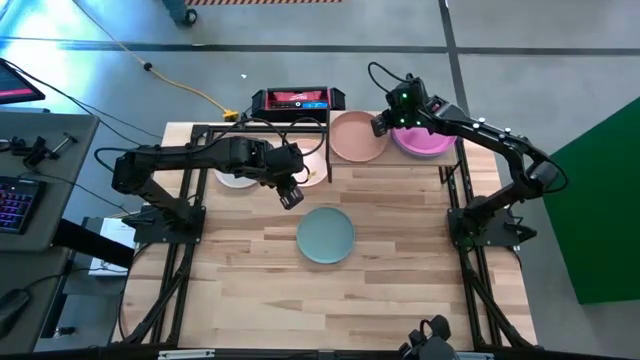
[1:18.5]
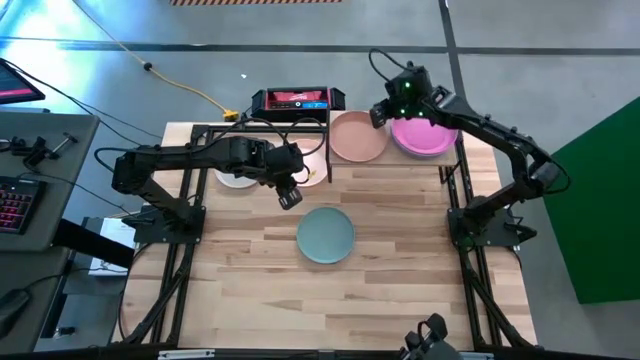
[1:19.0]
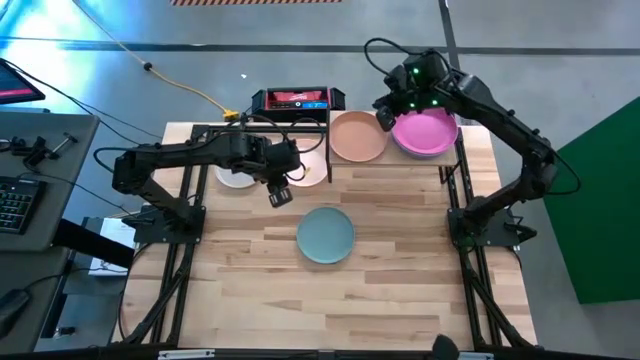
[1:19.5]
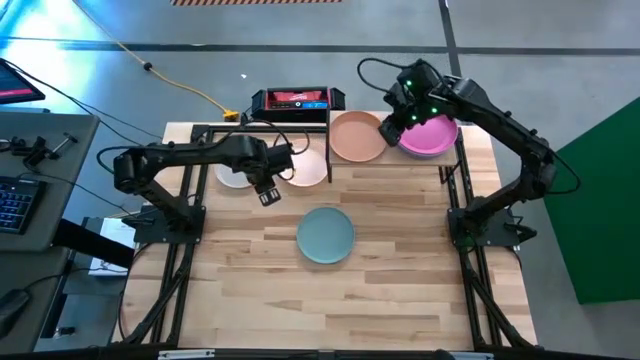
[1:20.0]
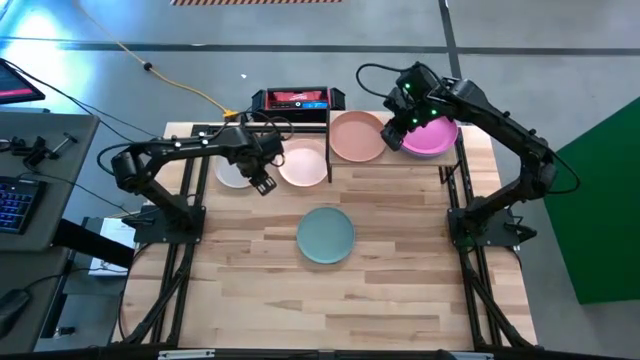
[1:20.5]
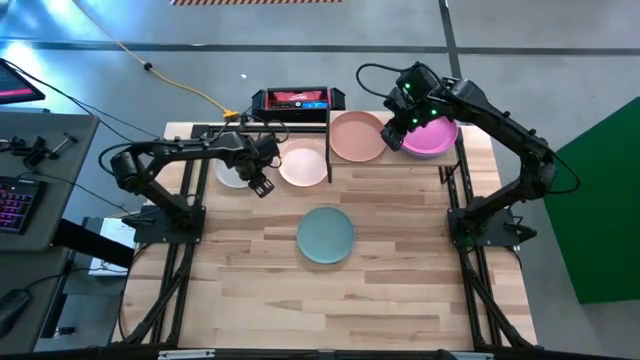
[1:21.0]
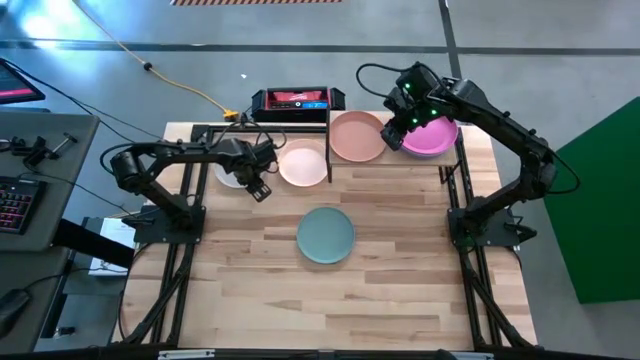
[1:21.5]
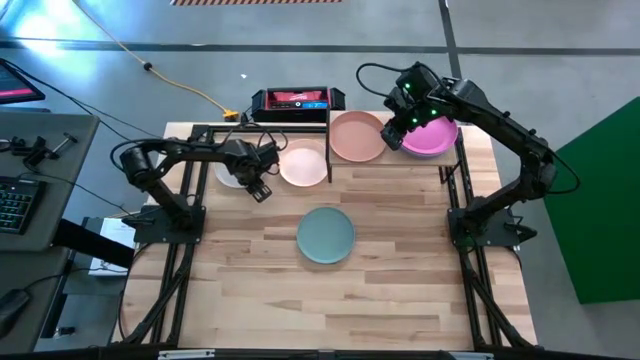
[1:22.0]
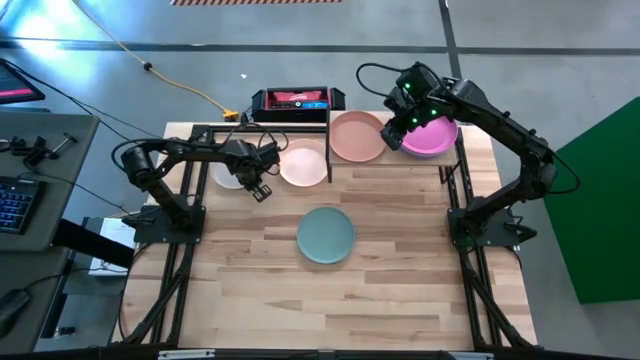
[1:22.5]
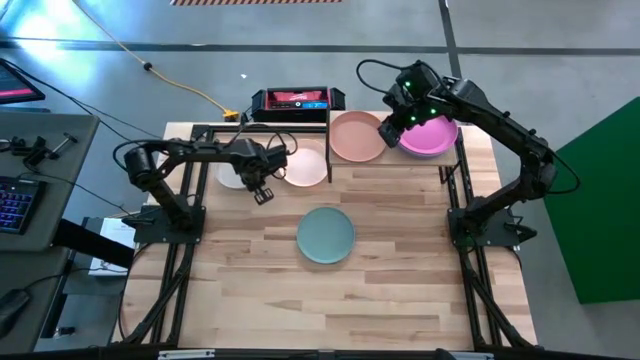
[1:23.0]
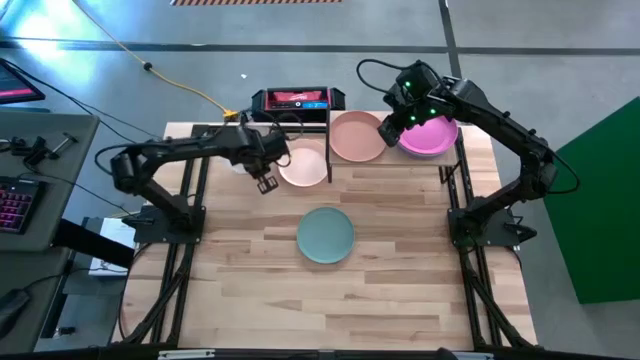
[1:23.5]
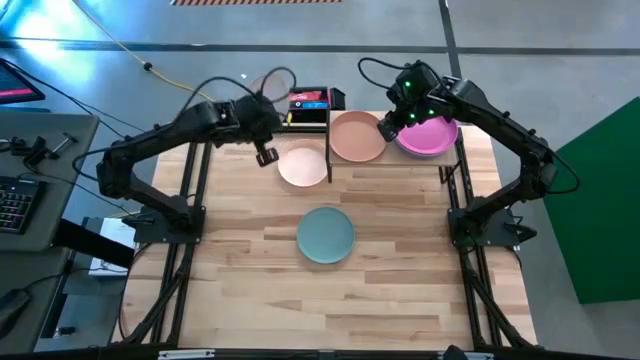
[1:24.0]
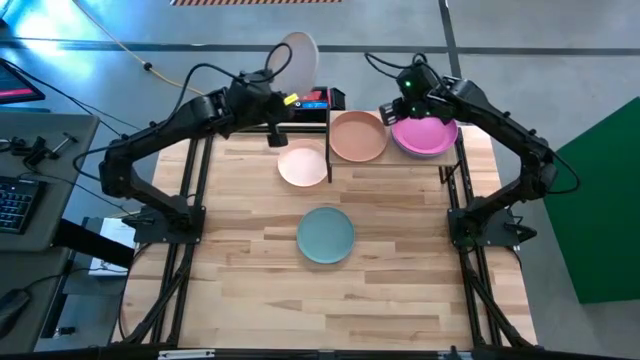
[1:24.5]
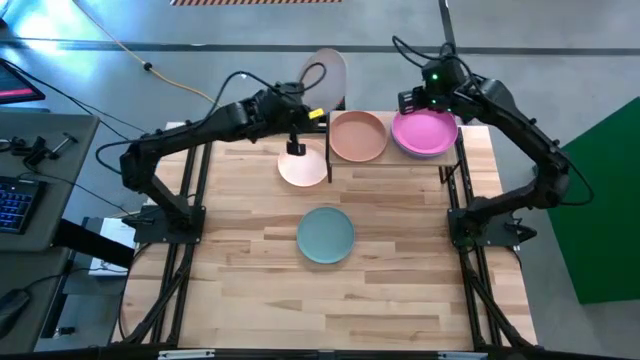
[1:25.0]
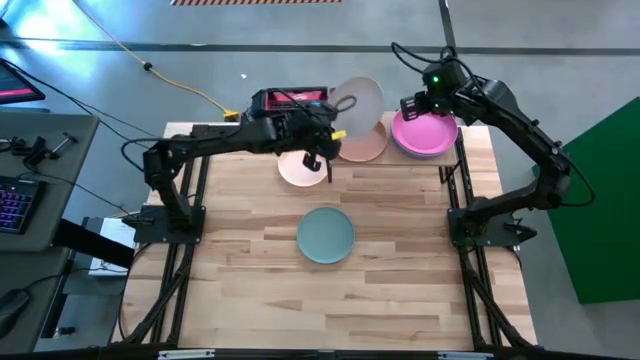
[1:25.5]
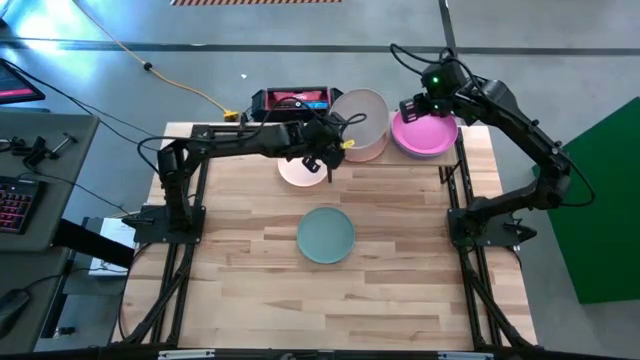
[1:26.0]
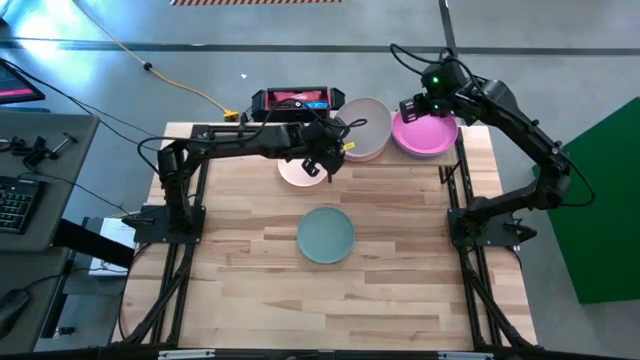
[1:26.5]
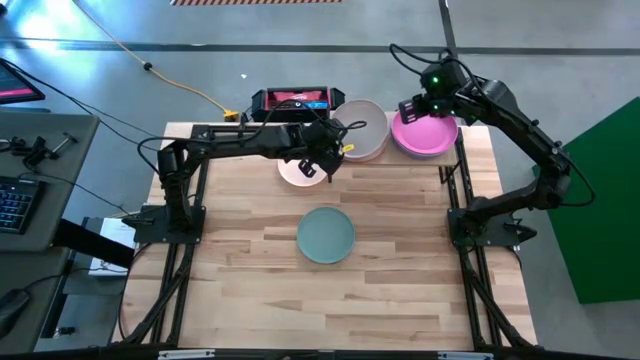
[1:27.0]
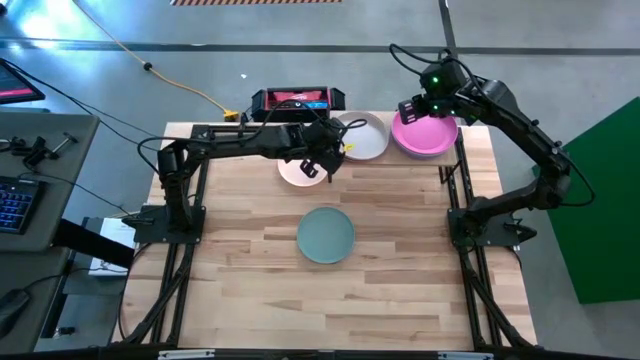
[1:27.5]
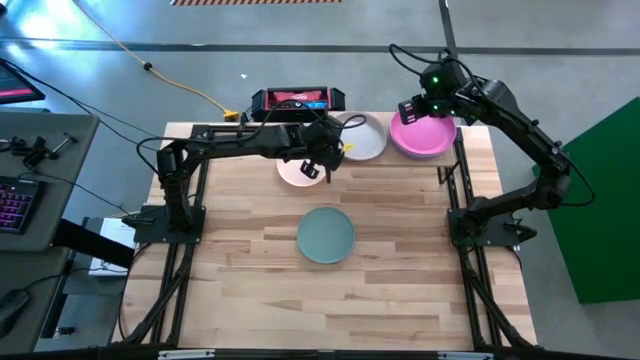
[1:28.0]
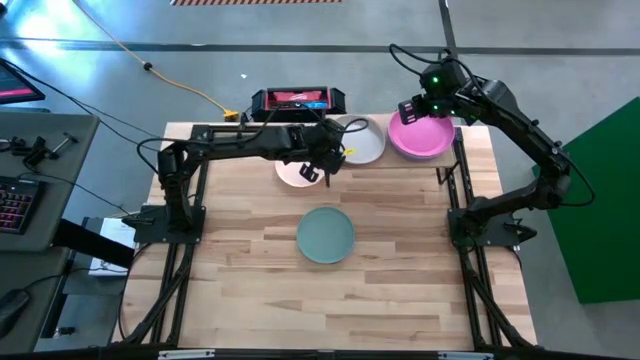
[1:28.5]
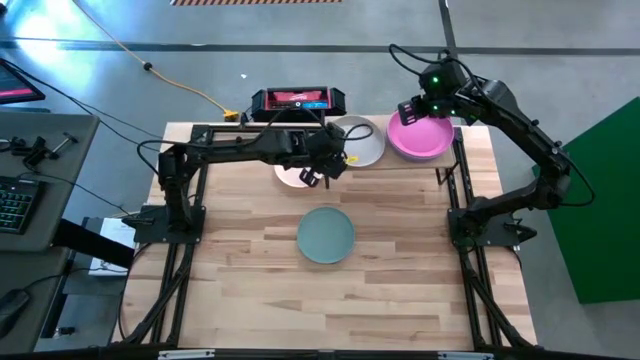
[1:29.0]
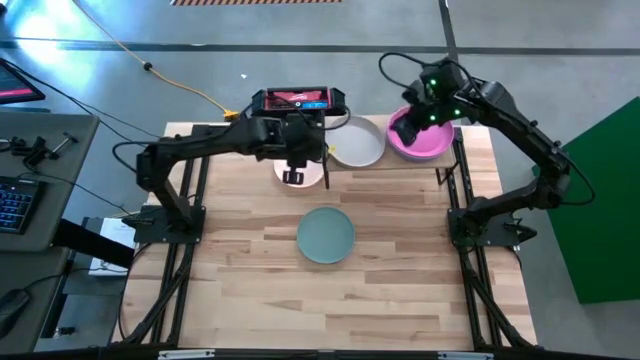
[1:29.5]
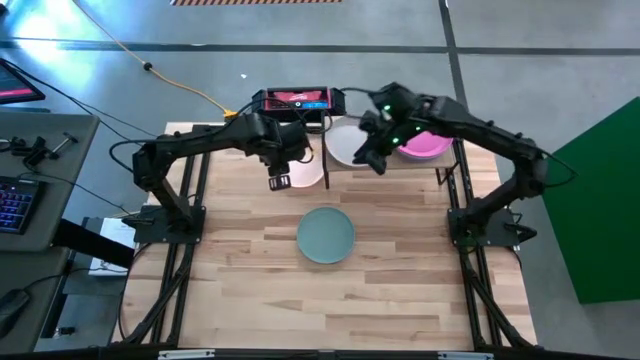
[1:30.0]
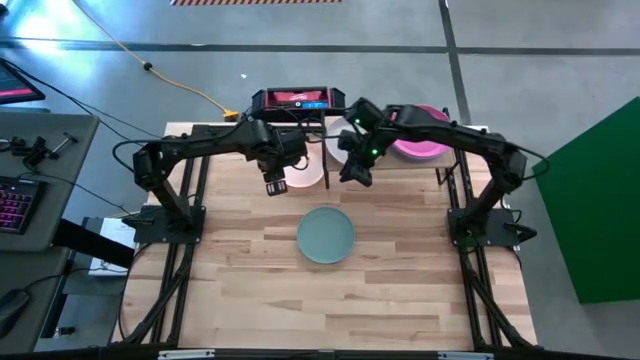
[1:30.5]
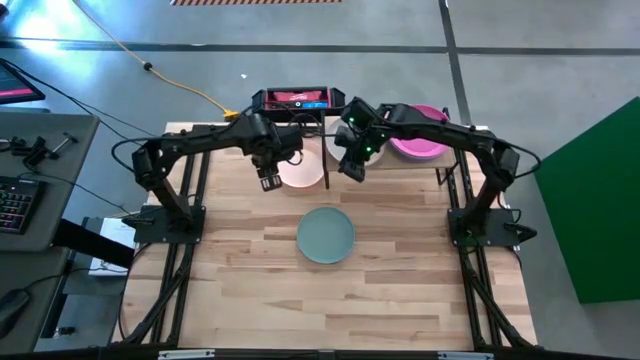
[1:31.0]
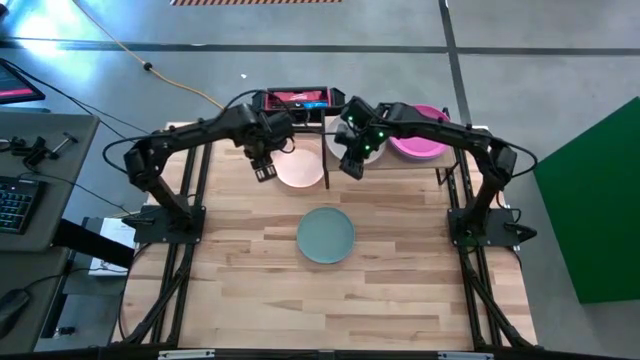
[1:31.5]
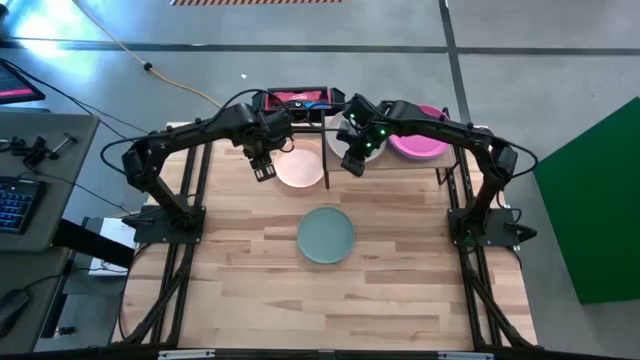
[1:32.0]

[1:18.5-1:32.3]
Task: Place and stack plates onto a shelf
Stack the white plate on the brown plate on the shelf

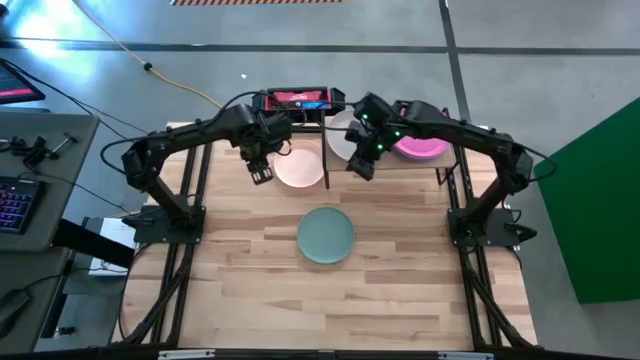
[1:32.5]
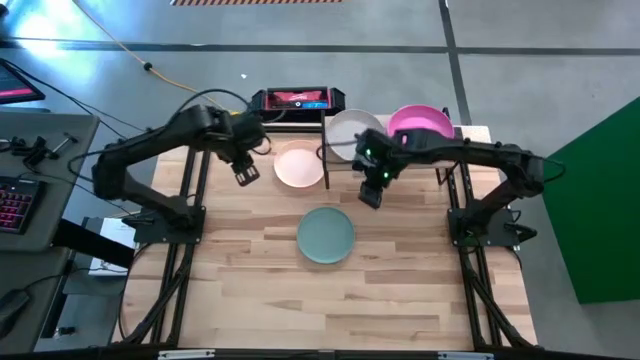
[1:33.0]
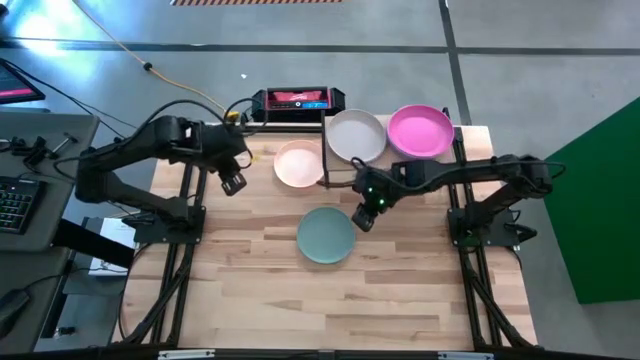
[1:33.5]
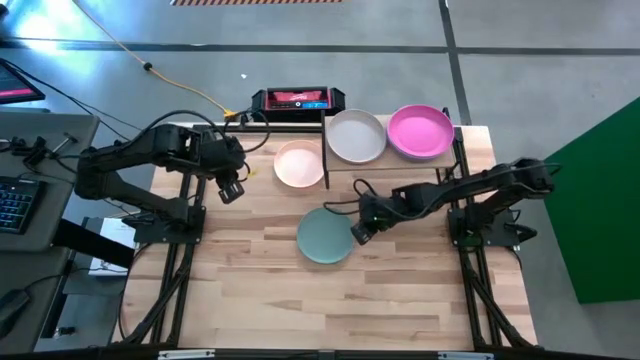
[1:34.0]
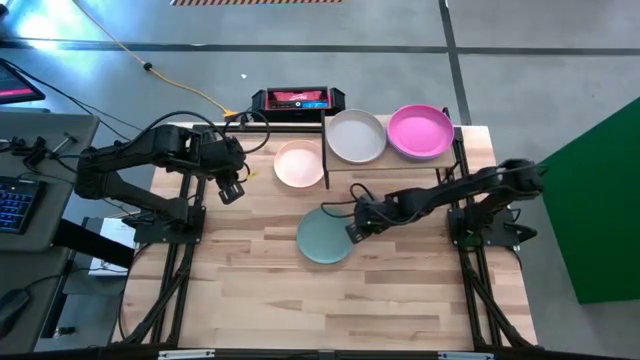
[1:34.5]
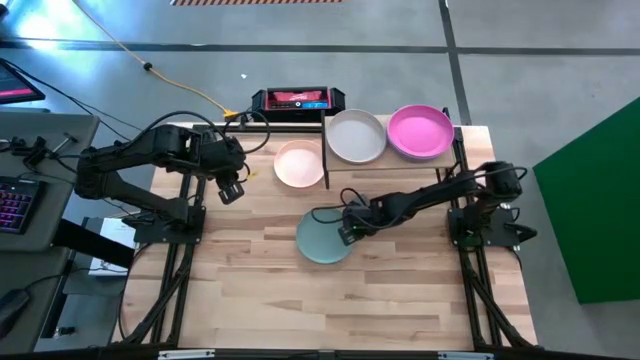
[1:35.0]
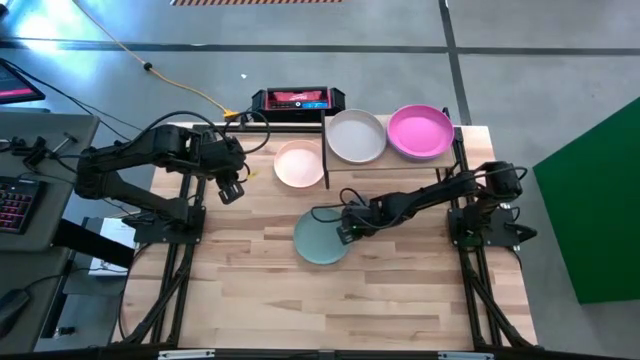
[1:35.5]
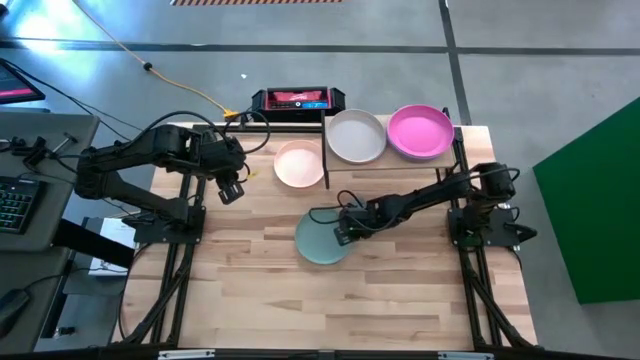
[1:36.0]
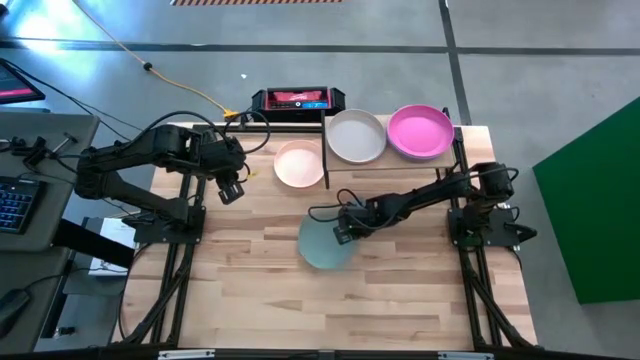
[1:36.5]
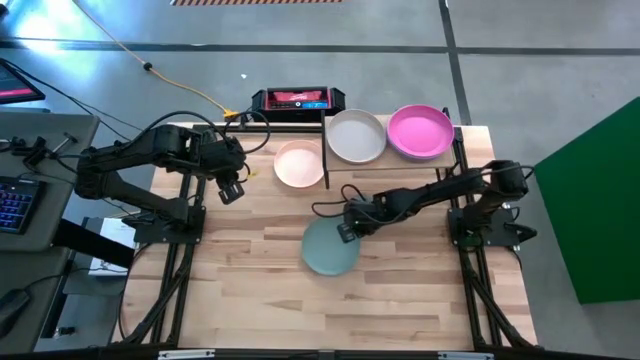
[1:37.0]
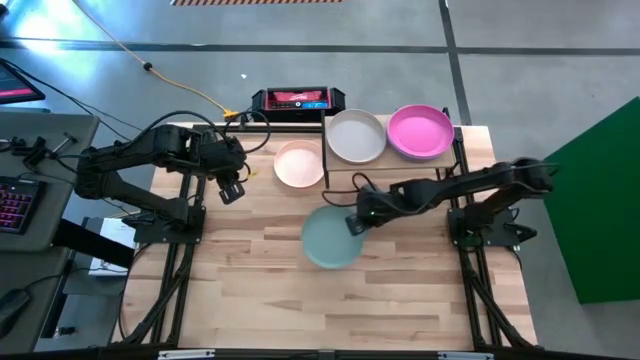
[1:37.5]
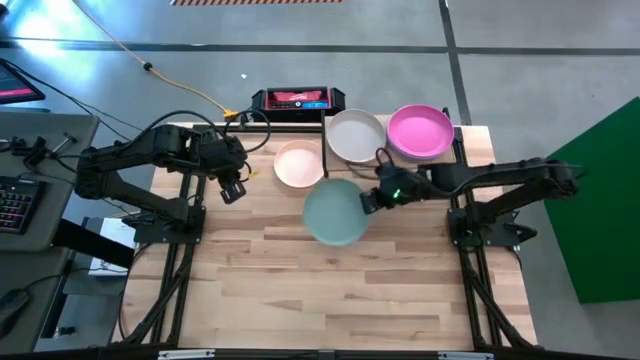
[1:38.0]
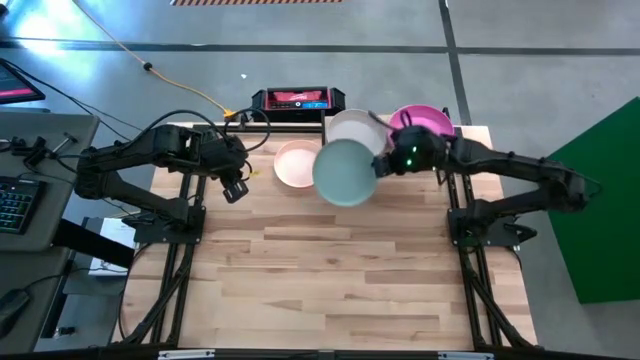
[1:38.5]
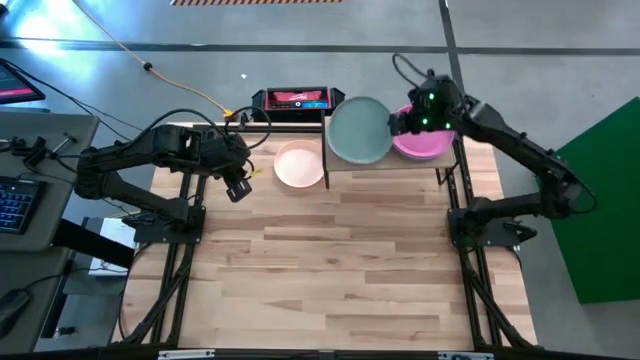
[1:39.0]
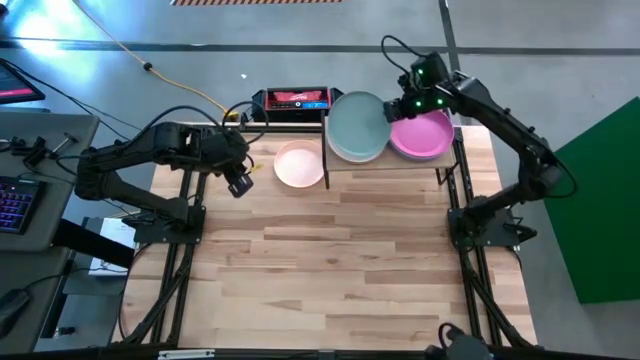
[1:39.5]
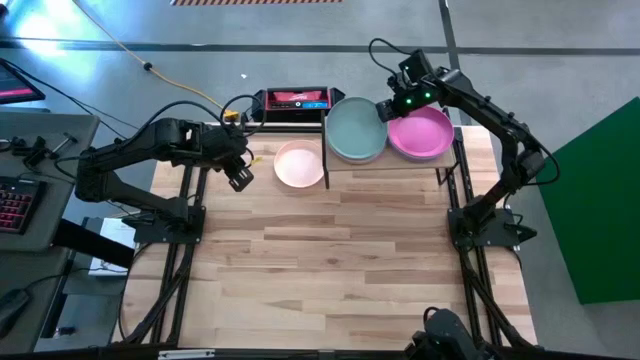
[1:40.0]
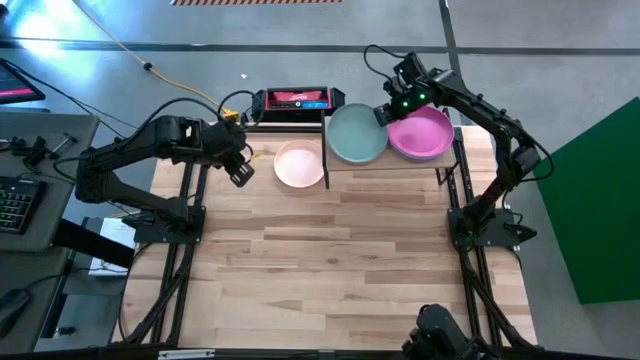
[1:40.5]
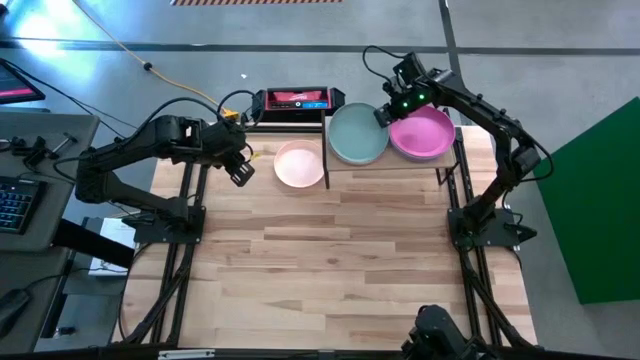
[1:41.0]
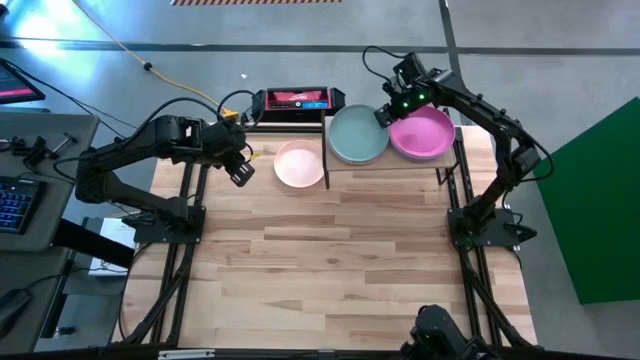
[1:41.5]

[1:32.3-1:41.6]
Stack the light green plate on the white plate on the shelf
